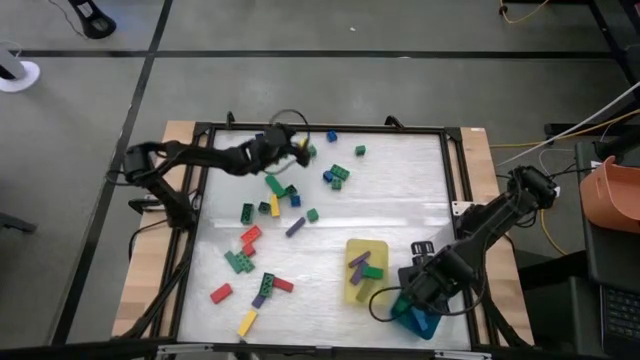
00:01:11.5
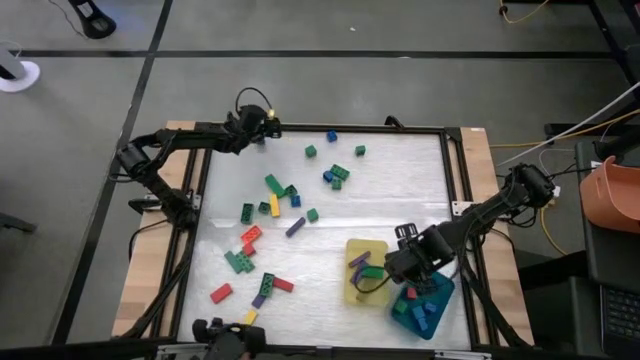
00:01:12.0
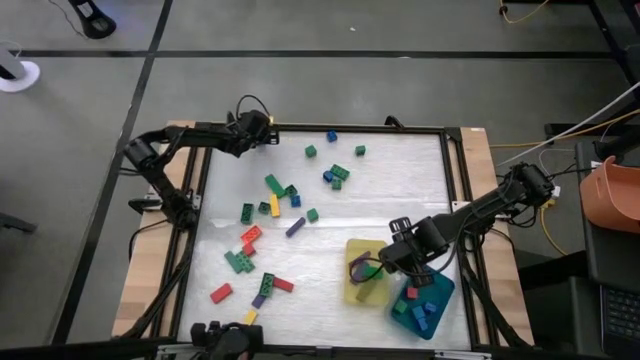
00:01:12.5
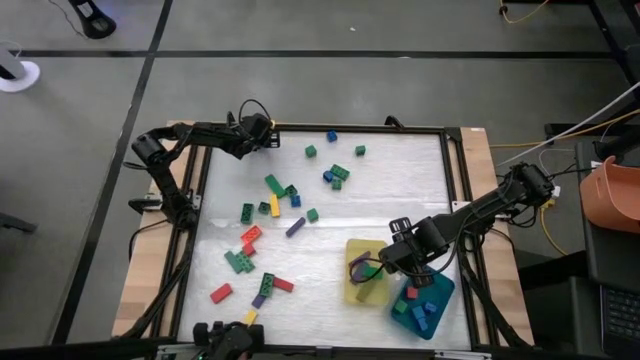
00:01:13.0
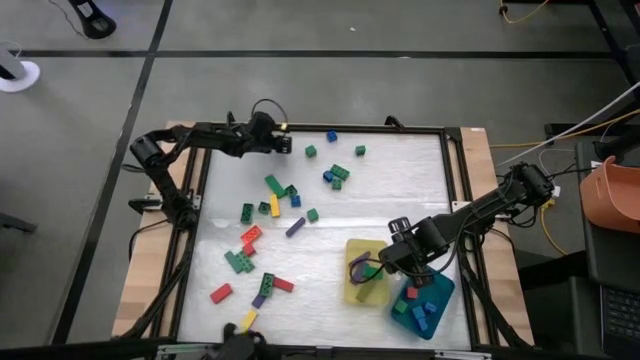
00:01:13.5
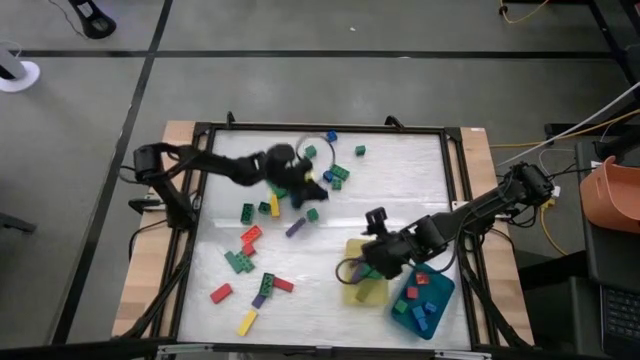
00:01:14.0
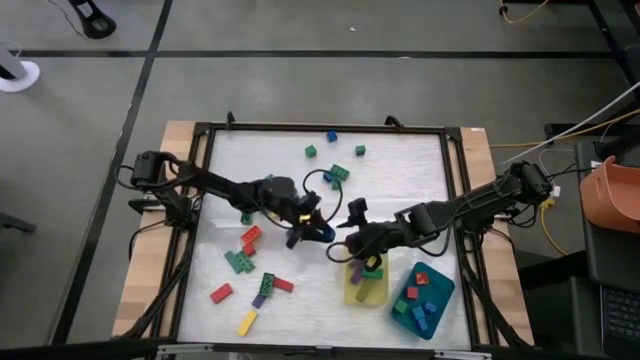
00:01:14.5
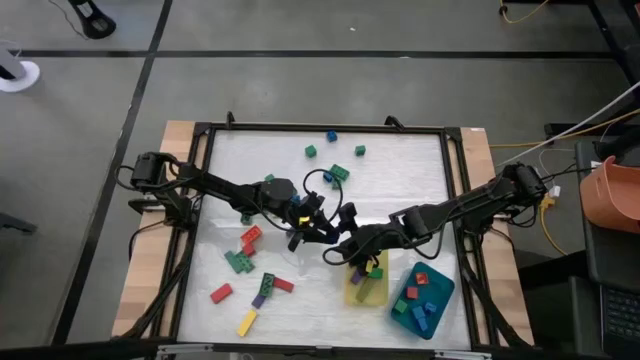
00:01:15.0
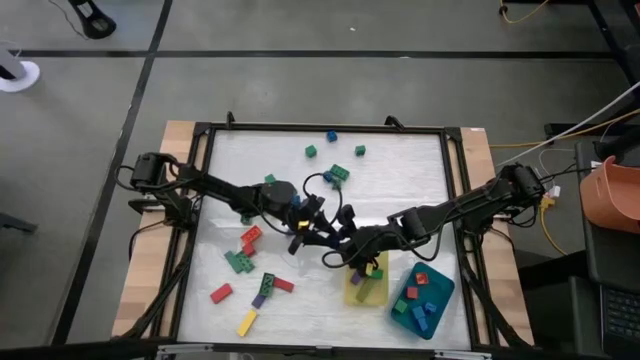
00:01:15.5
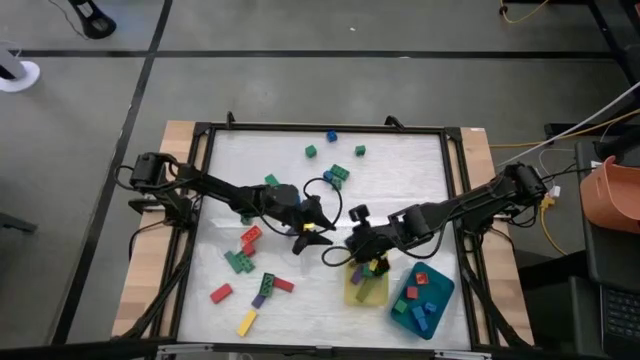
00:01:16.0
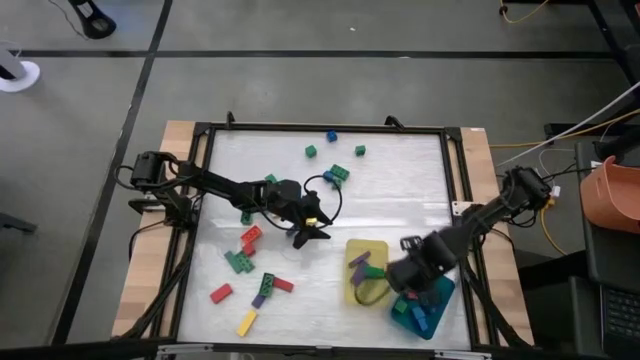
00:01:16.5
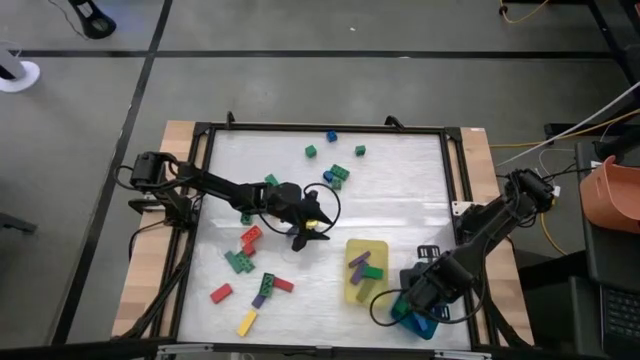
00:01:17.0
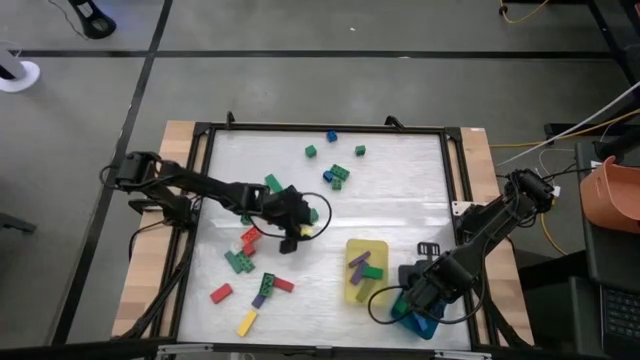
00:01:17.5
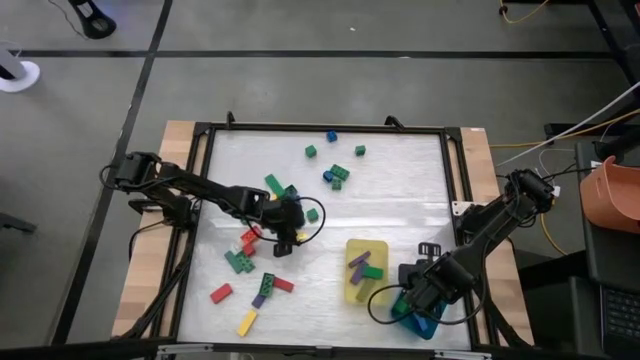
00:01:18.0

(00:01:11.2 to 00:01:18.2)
Task: Sort blocks by size
Put the small blue game piece into the blue bin

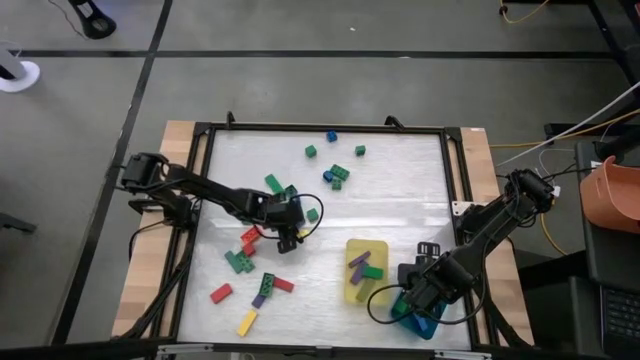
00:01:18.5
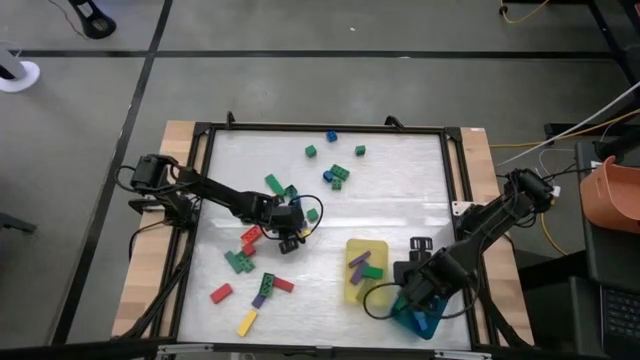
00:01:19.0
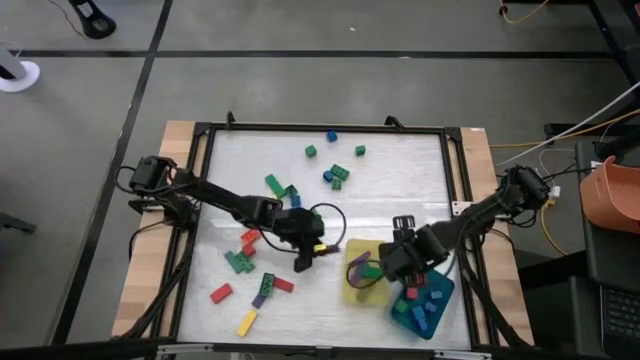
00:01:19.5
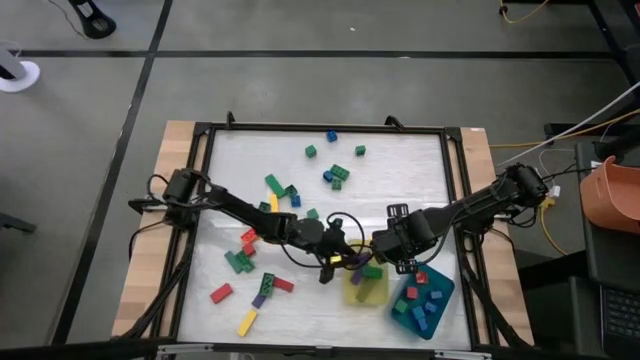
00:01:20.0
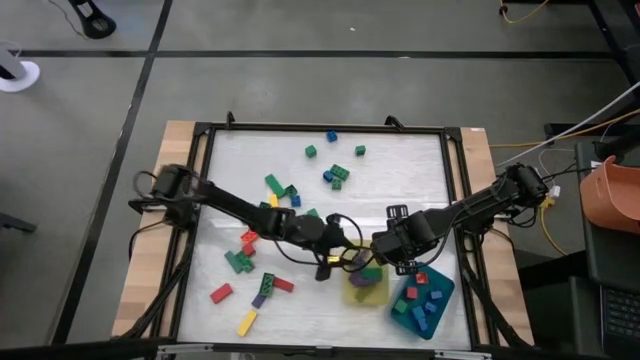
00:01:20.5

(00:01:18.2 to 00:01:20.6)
Put the long violet block into the yellow bin

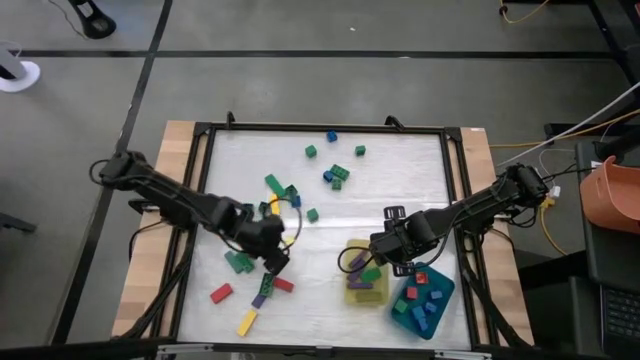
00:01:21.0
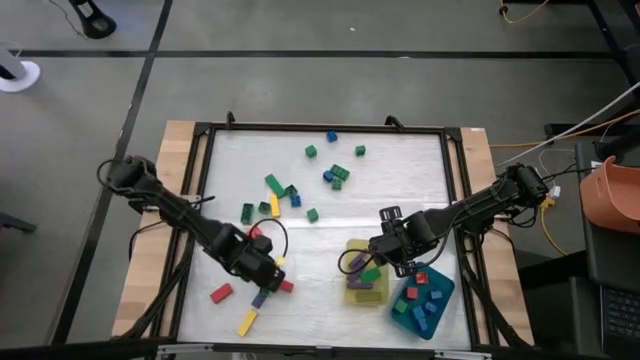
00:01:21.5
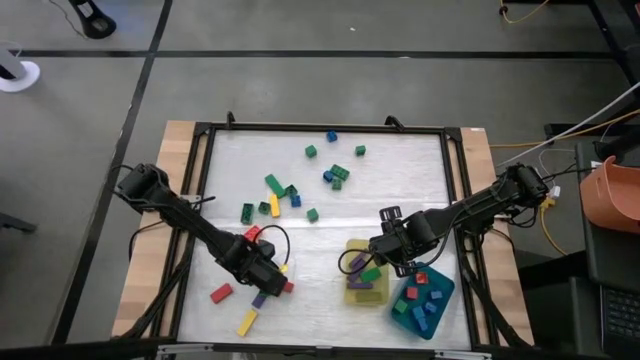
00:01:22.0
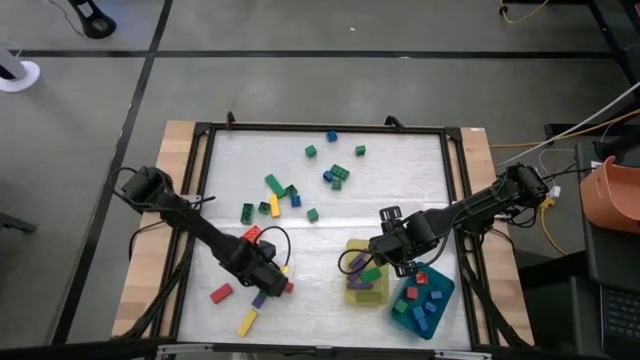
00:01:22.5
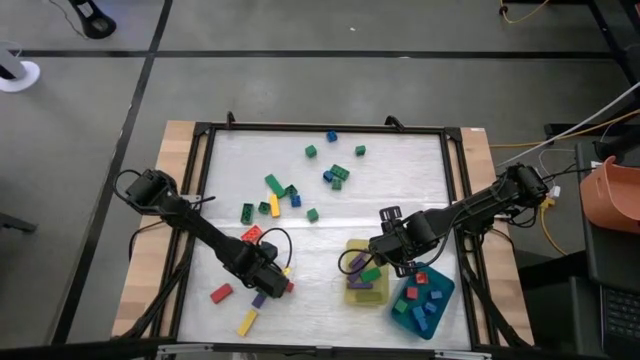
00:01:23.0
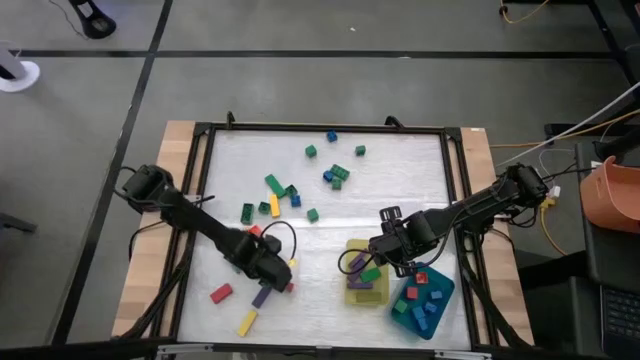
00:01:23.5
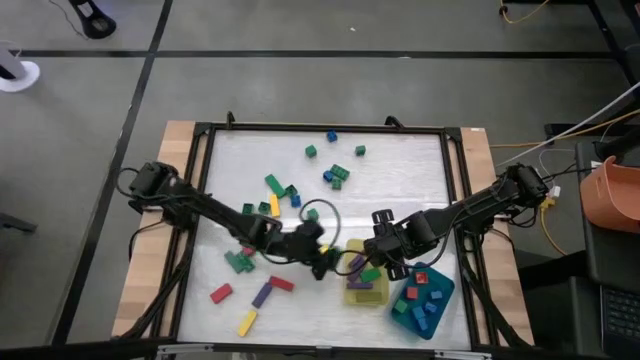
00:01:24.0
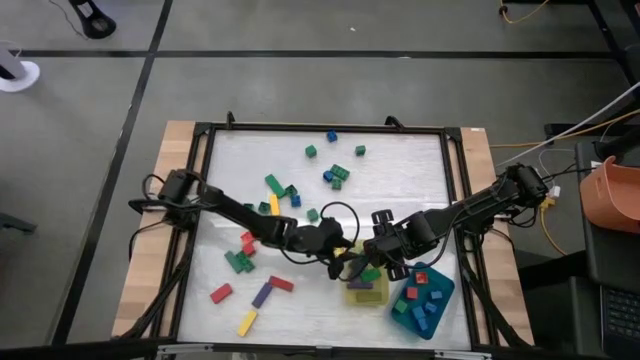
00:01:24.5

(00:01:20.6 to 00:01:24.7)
Put the long green block into the yellow bin

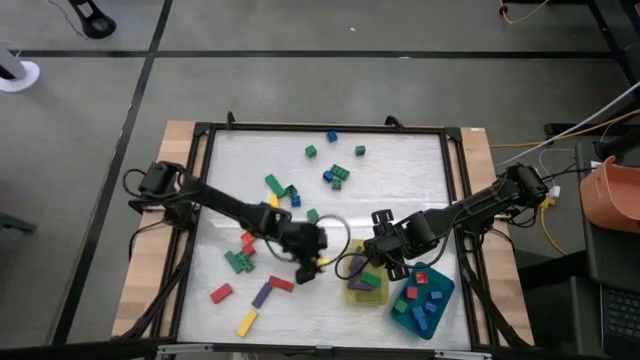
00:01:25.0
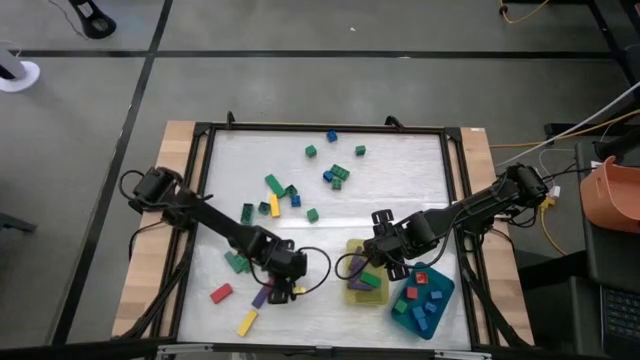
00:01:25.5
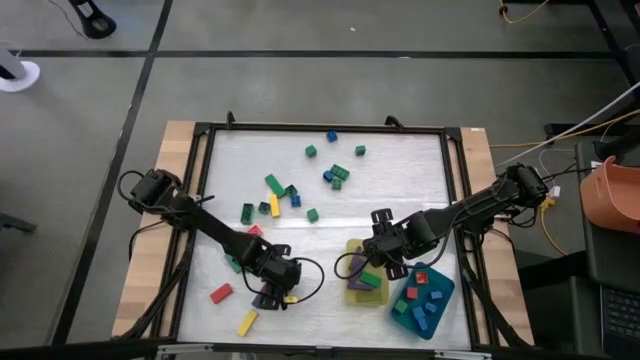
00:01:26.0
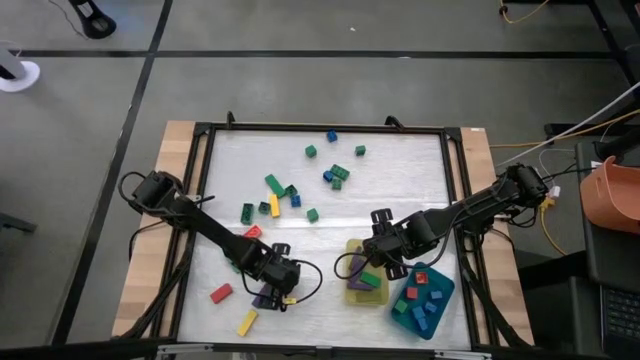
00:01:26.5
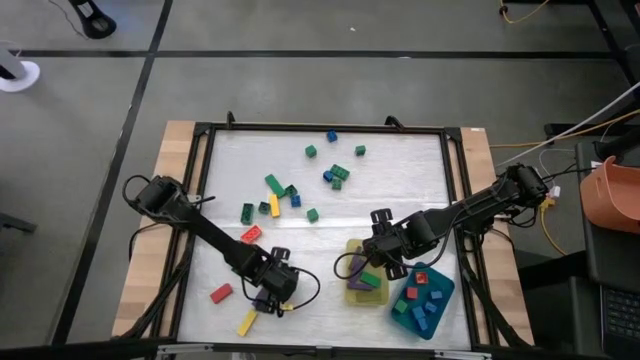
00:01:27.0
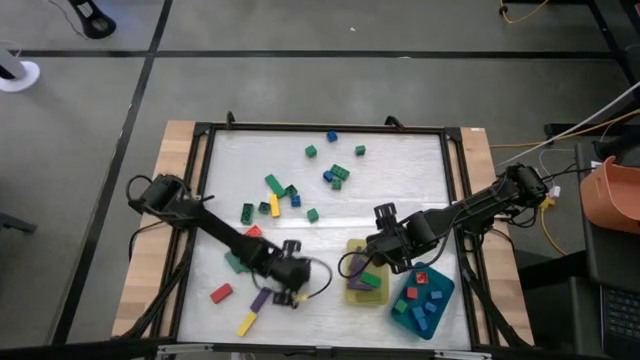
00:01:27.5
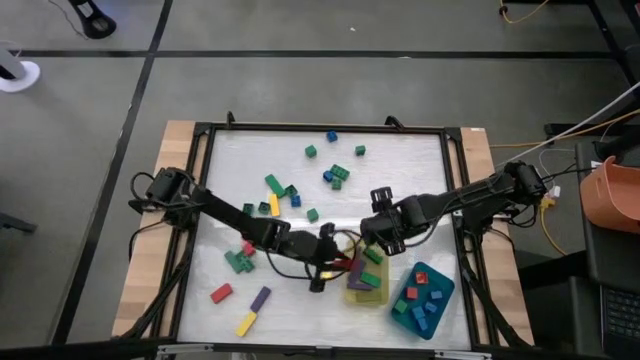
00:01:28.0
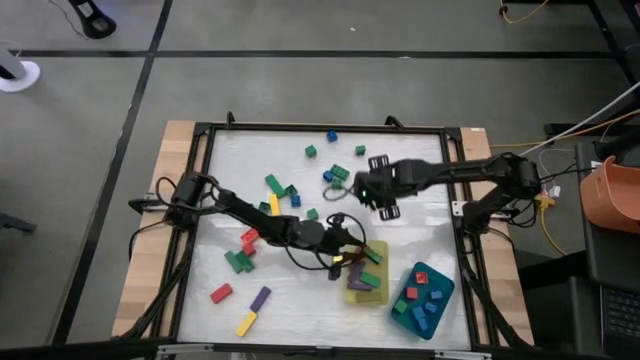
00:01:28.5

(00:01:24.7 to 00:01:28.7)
Put the long orange block into the yellow bin

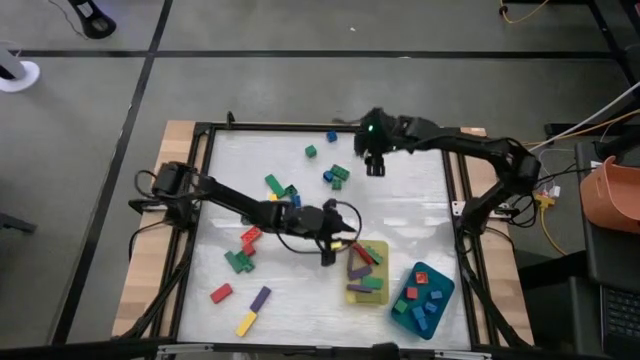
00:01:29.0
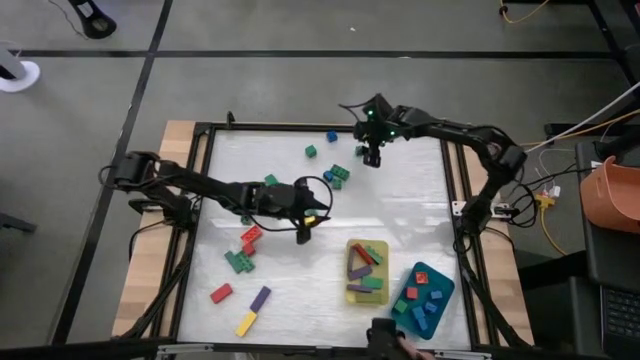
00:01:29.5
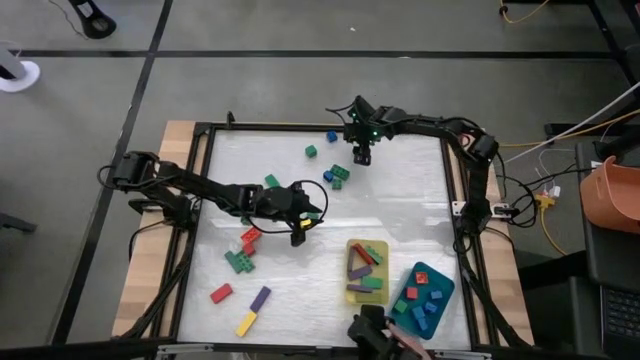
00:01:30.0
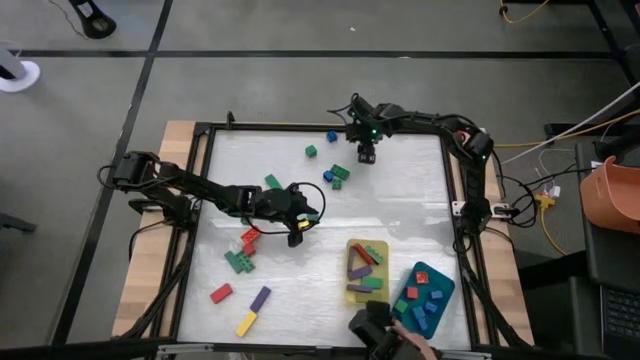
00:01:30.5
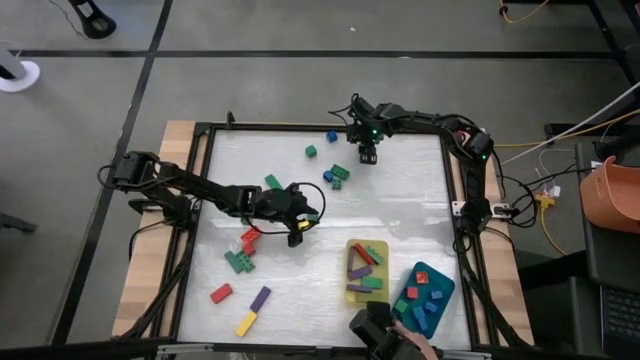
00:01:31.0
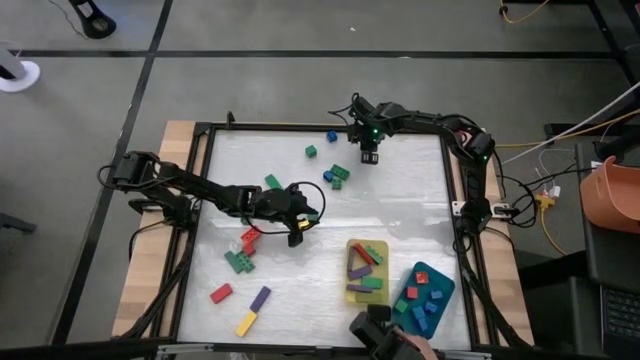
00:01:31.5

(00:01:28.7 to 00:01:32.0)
Put the small green game piece into the blue bin

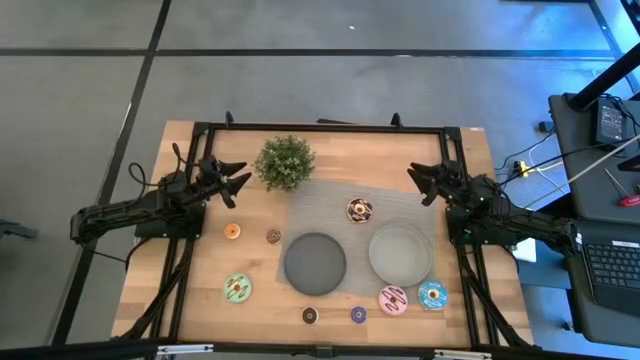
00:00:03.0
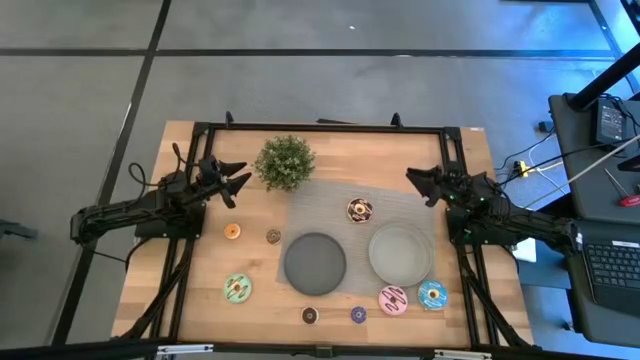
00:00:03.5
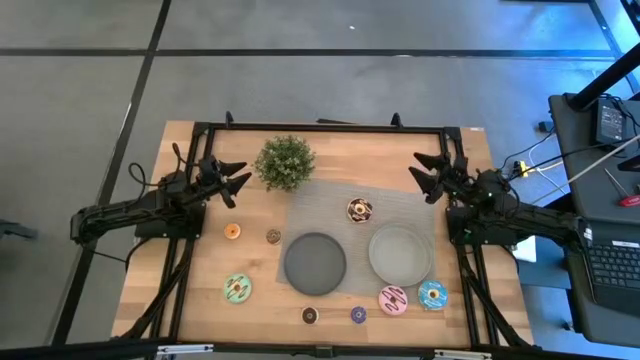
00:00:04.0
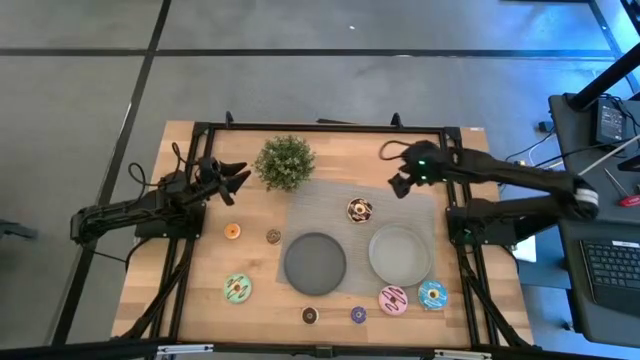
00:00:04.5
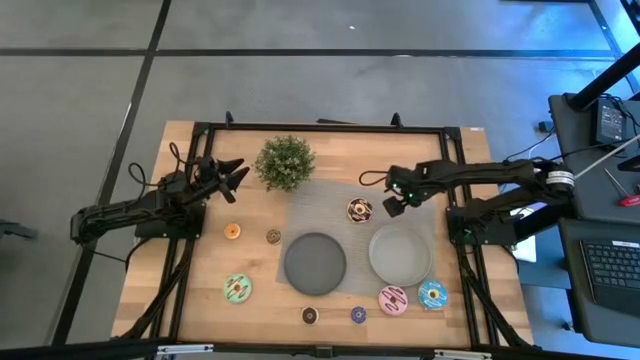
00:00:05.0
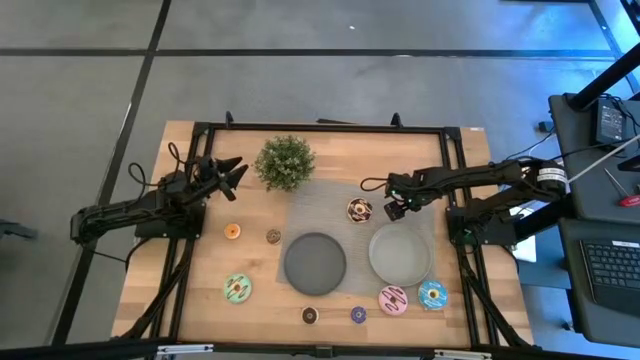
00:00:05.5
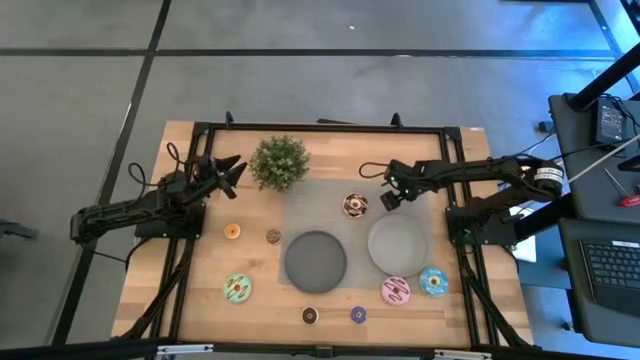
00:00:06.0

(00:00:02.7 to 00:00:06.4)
Task: Pick & Place donuts
Adjust the gray mat on the table
